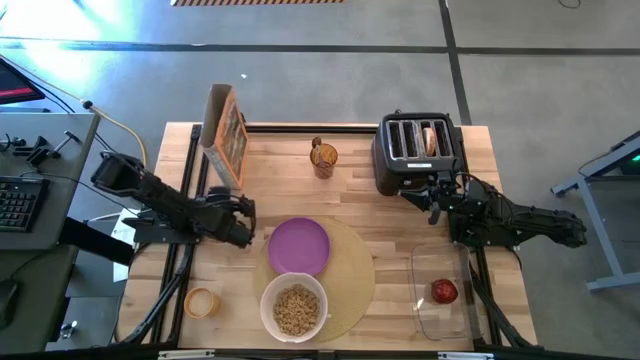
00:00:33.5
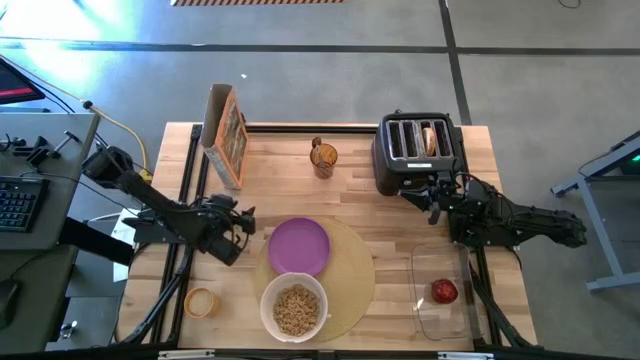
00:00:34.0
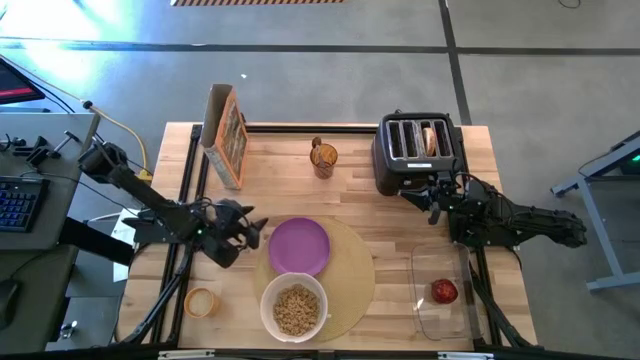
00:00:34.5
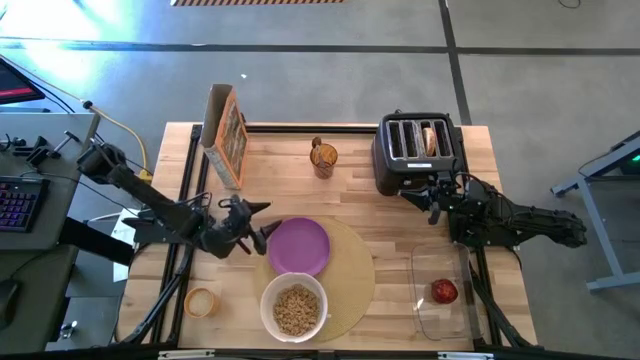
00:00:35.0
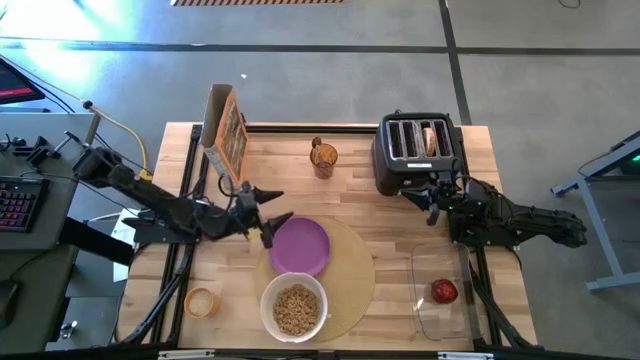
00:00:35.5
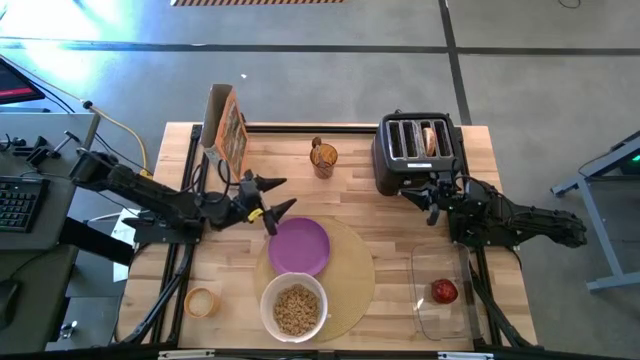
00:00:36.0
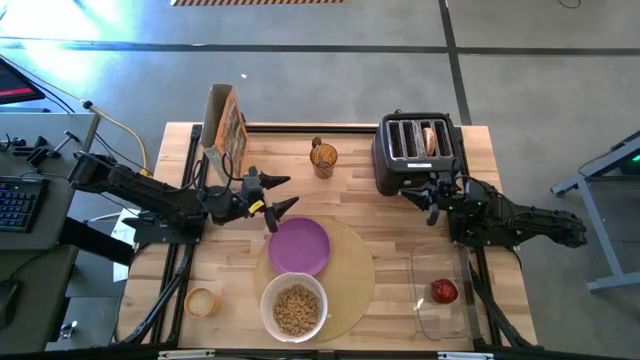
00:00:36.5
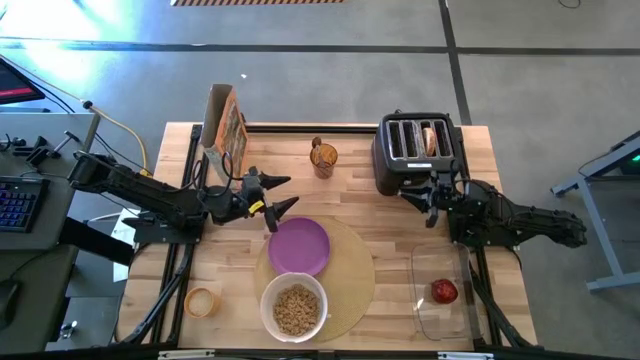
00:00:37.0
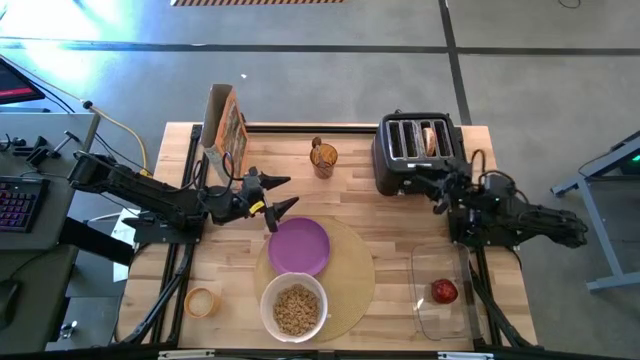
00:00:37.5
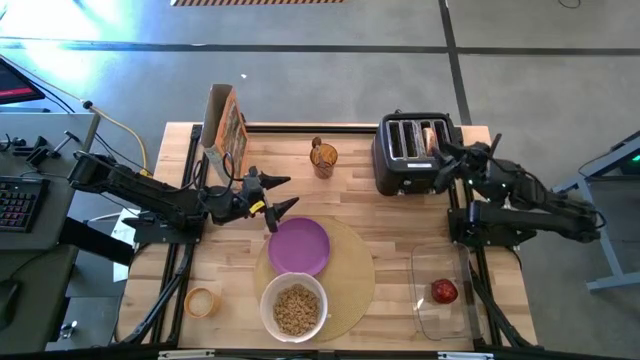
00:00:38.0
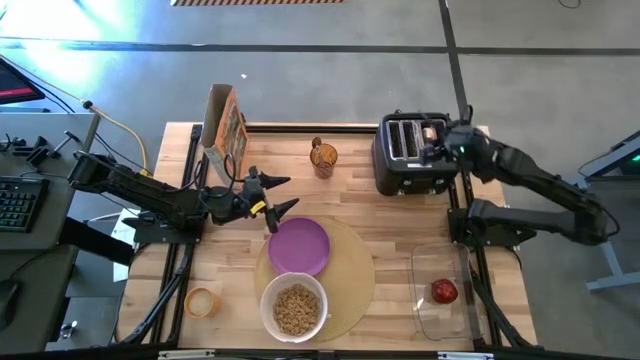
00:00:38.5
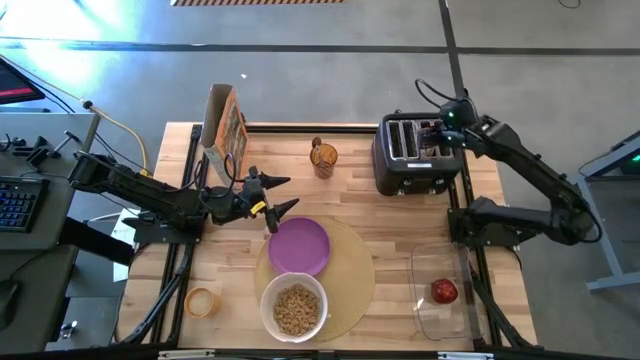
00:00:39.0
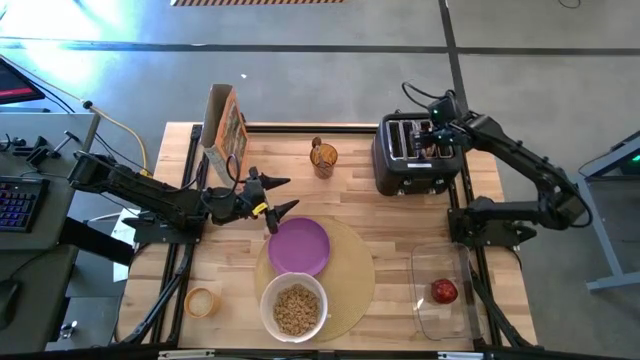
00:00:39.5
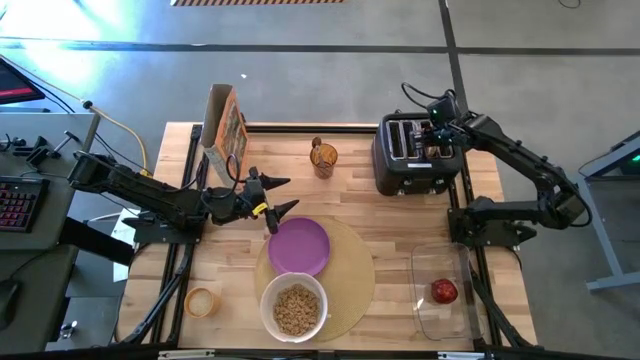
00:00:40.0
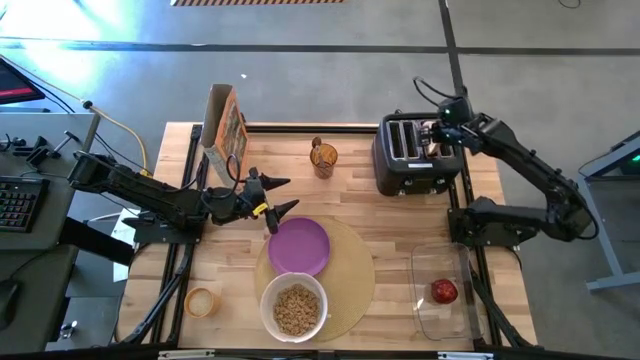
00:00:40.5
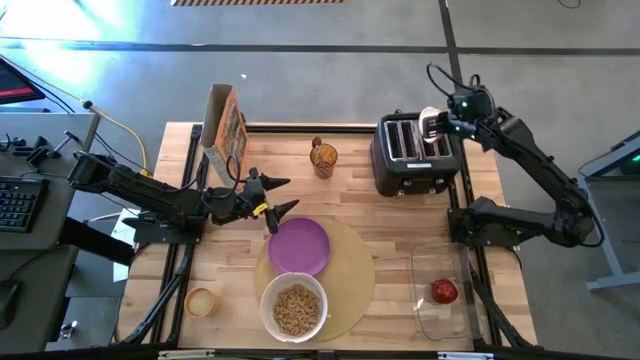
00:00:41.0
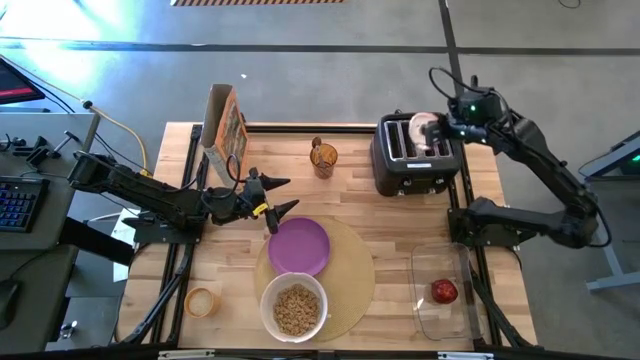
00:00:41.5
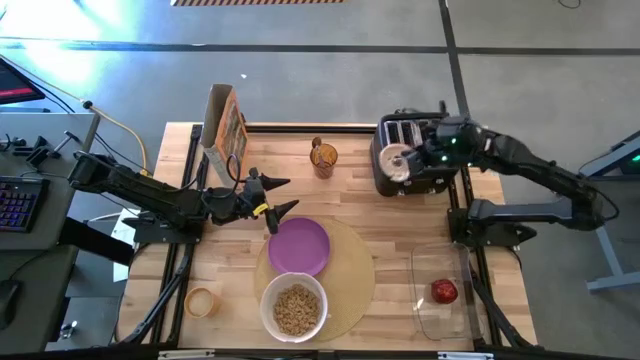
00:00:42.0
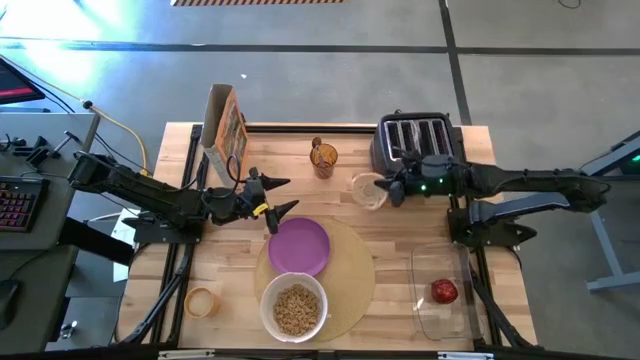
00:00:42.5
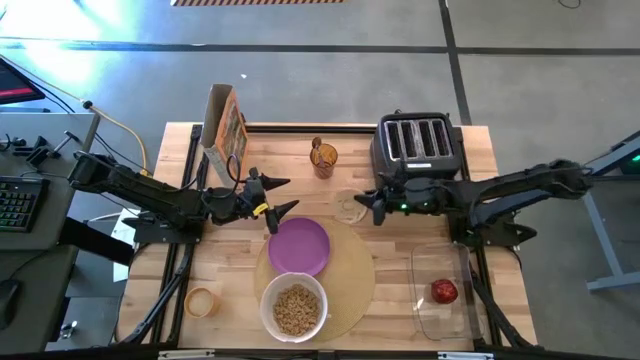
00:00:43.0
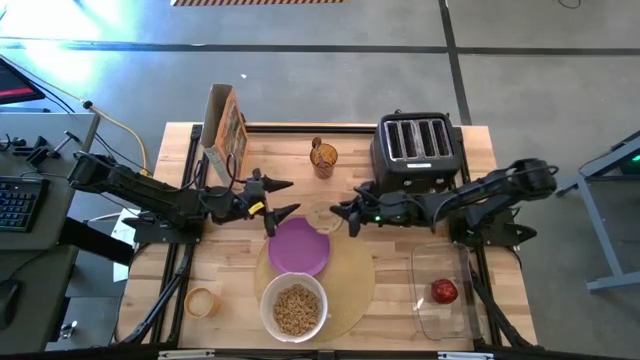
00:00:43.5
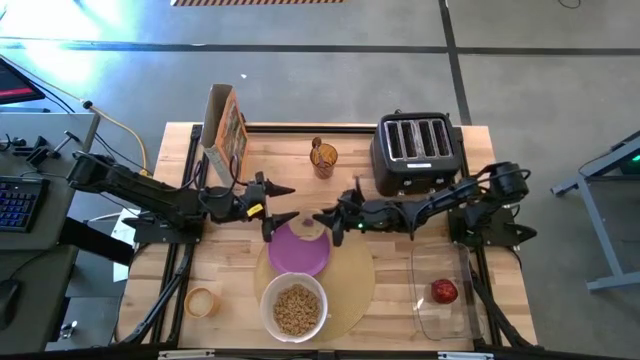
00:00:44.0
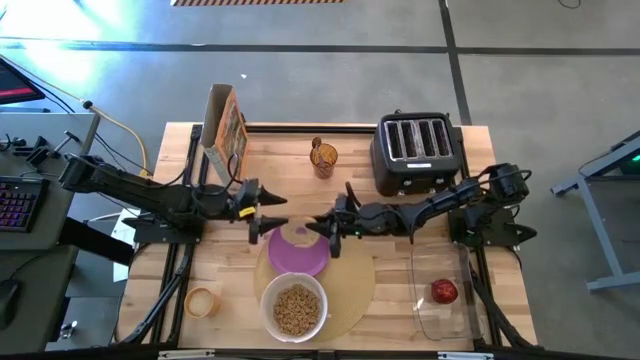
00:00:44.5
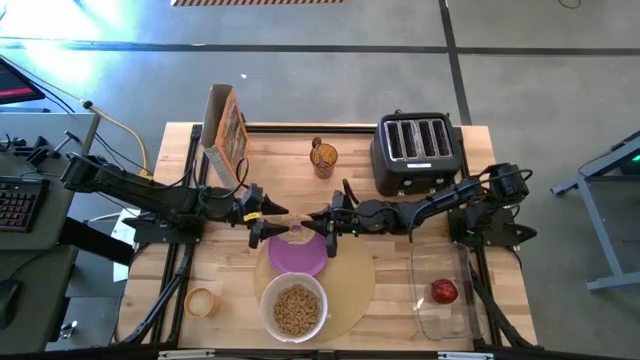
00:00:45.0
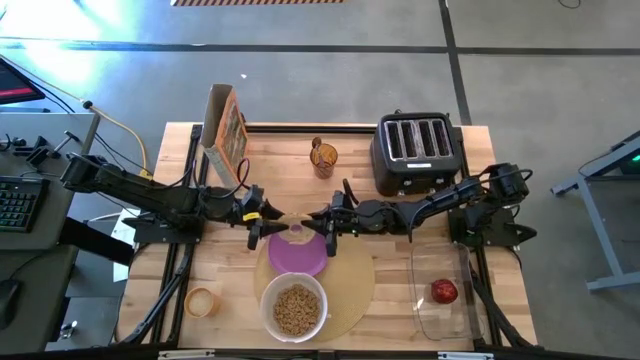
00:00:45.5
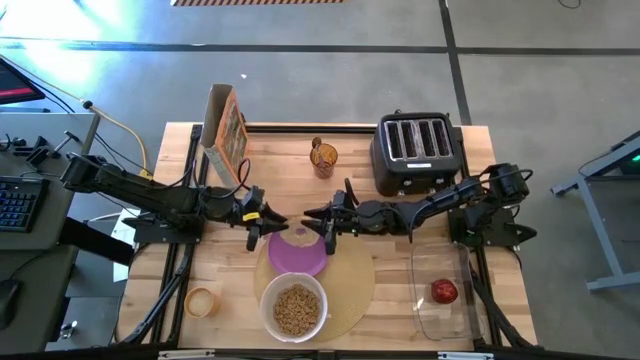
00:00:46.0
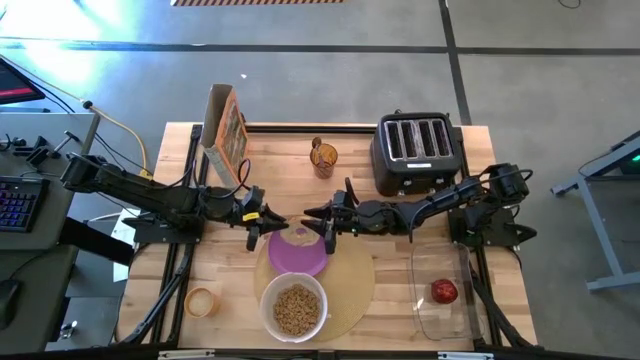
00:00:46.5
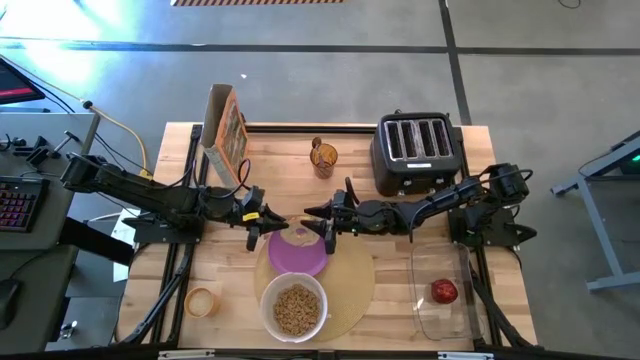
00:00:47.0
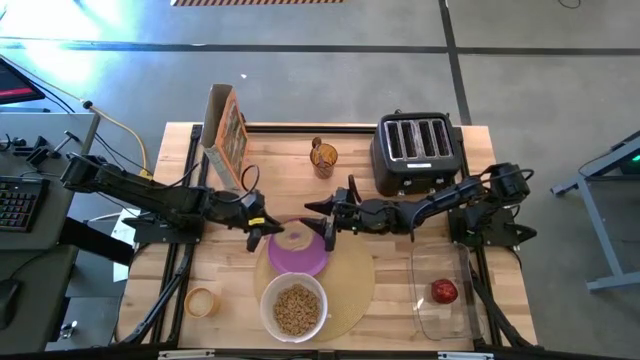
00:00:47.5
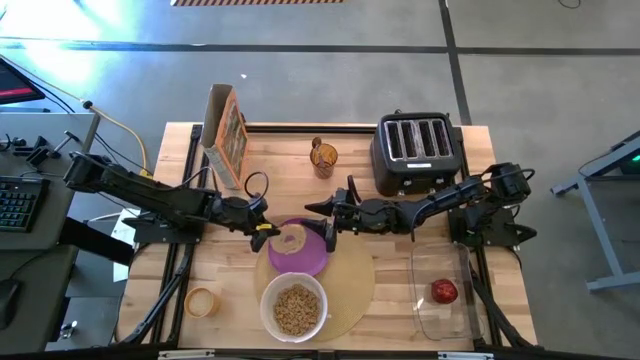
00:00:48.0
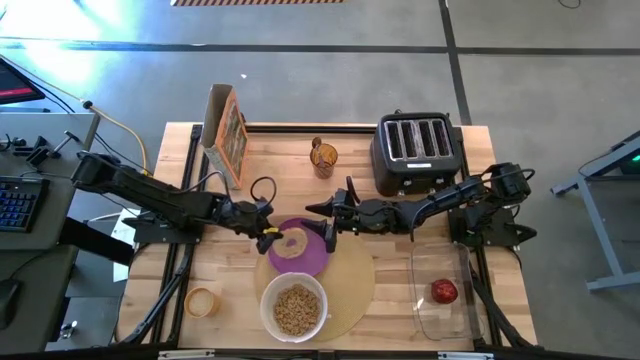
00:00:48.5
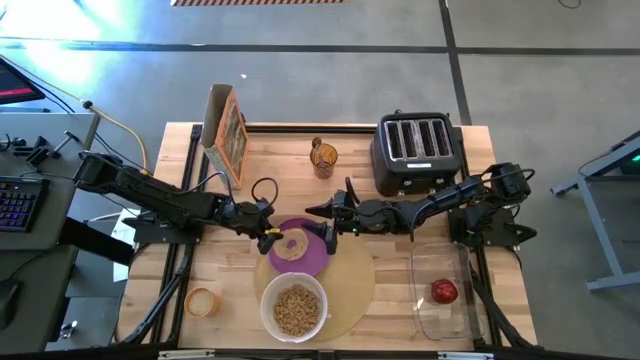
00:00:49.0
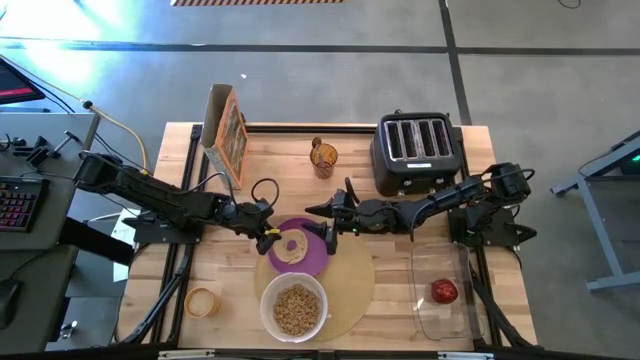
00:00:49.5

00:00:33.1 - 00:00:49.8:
Task: Arrange a breakfast setting
Put the bagel on the violet plate

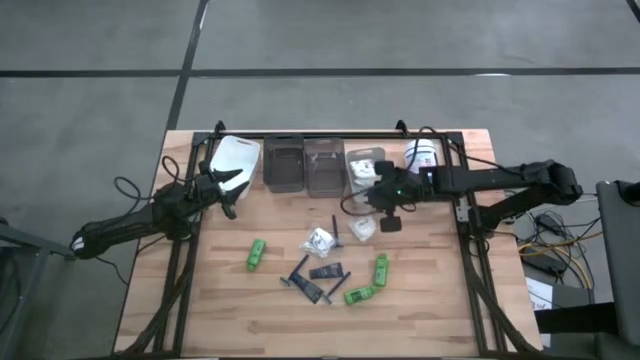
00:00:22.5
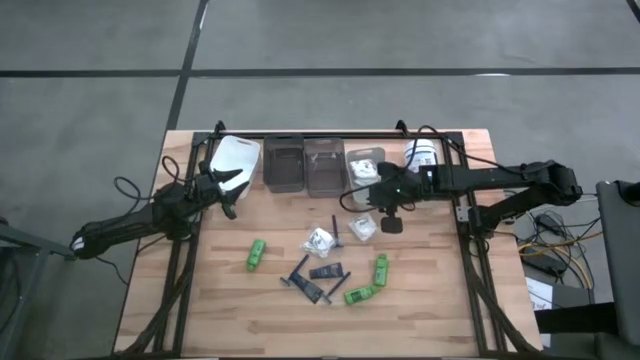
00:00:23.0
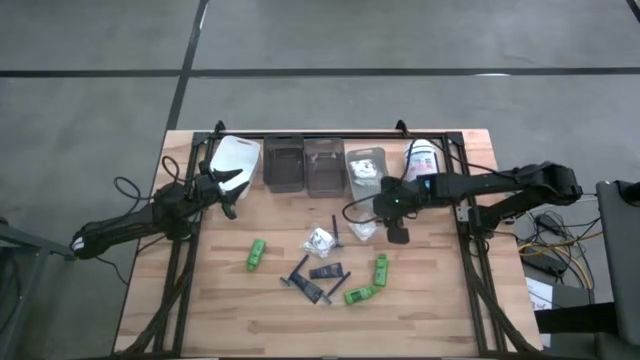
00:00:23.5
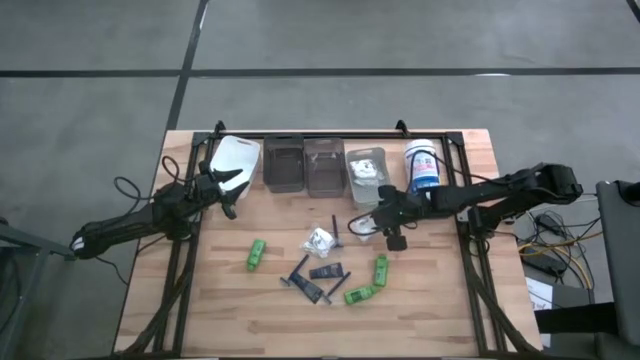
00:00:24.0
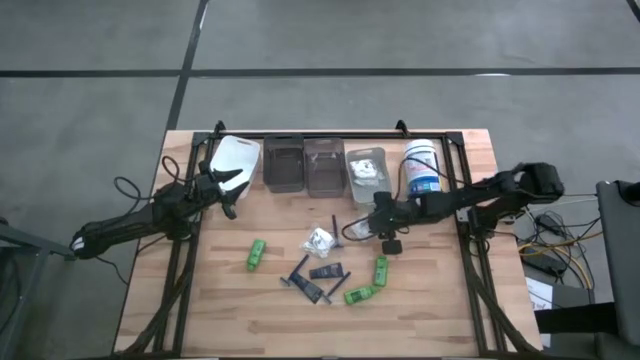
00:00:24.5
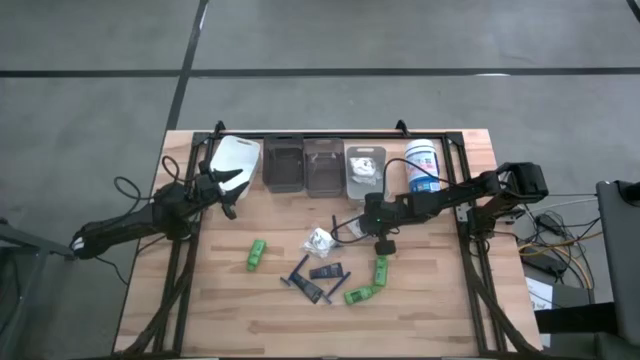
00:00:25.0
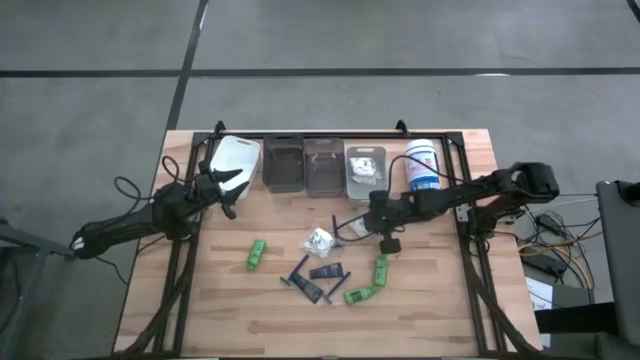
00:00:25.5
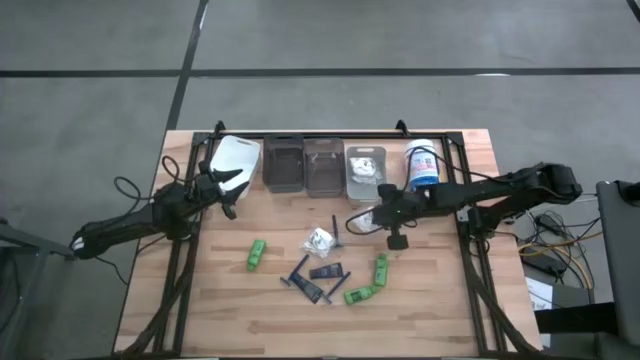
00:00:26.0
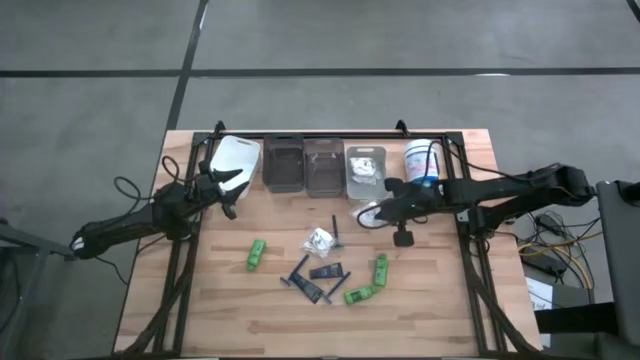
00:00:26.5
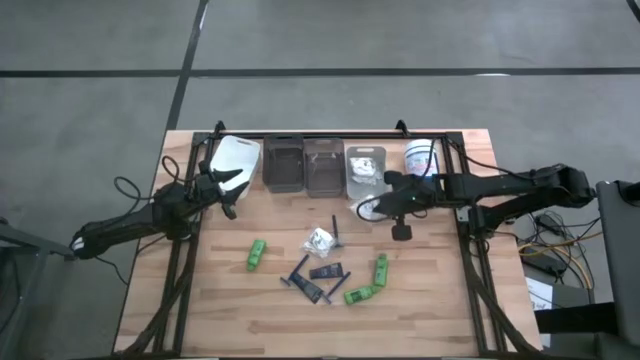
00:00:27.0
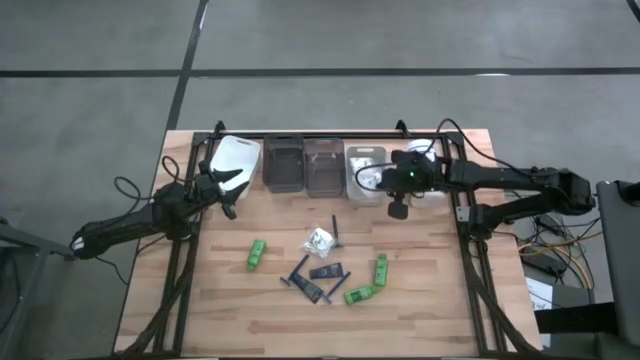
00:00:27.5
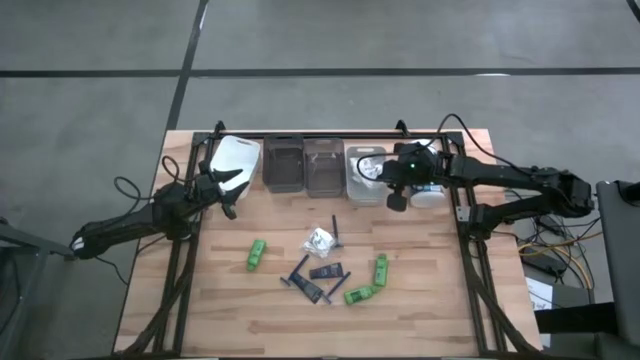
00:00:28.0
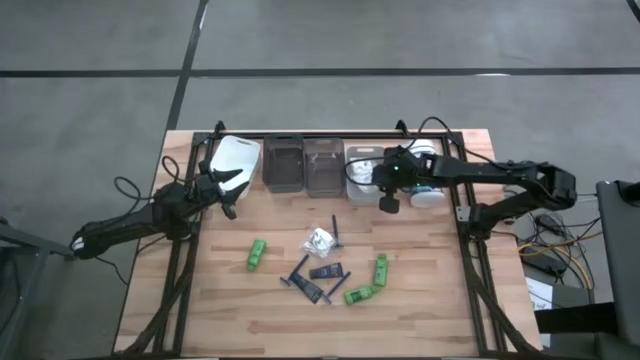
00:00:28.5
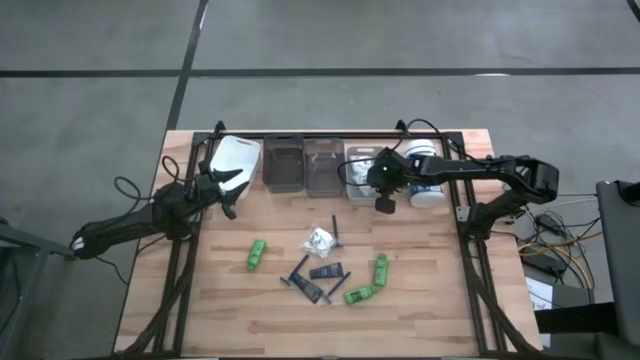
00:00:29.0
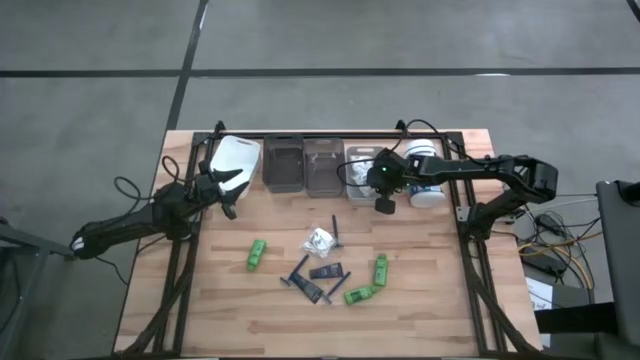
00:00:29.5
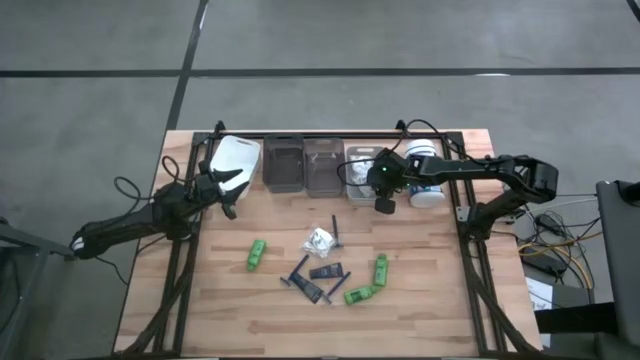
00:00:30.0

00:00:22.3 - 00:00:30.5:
Task: Pick & Place Travel size toiletries
Put the bottom cotton pack into the grey bin
